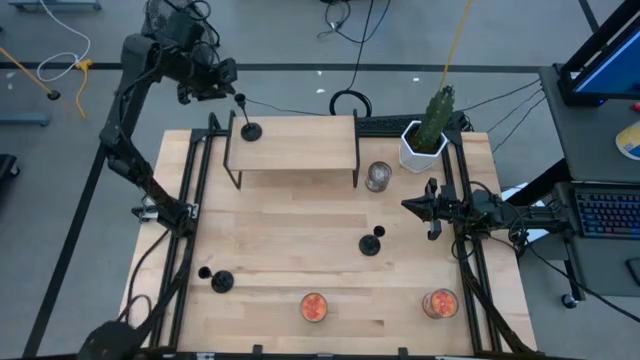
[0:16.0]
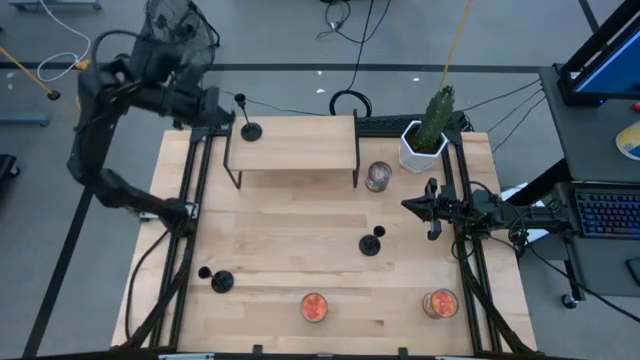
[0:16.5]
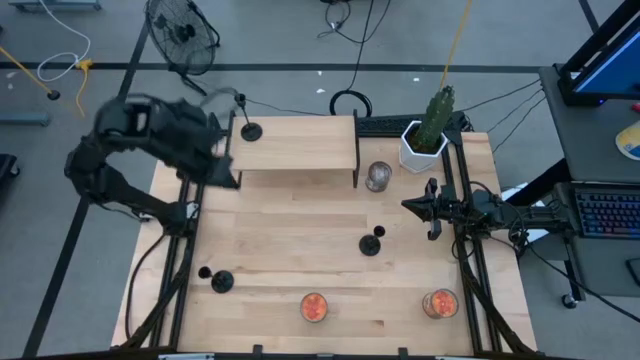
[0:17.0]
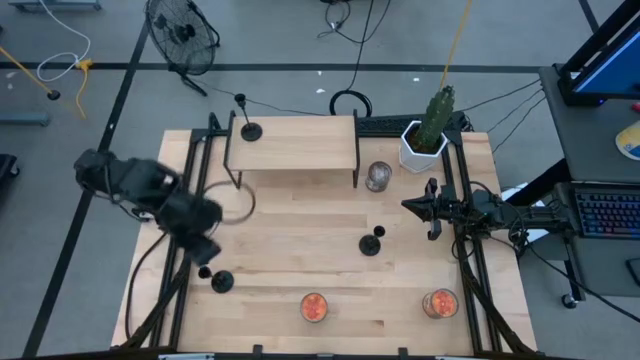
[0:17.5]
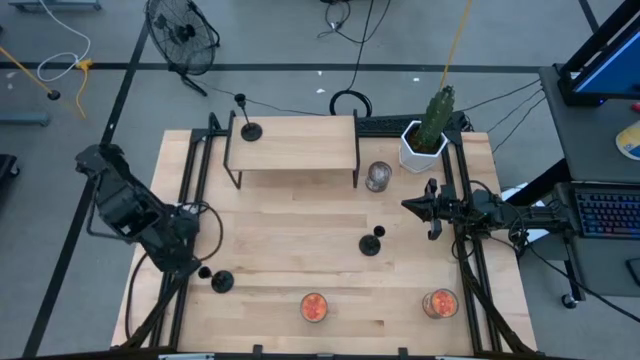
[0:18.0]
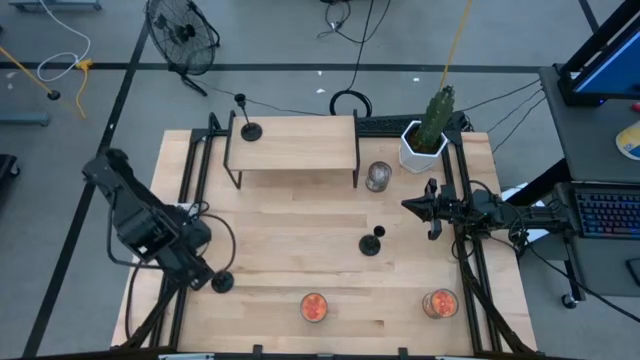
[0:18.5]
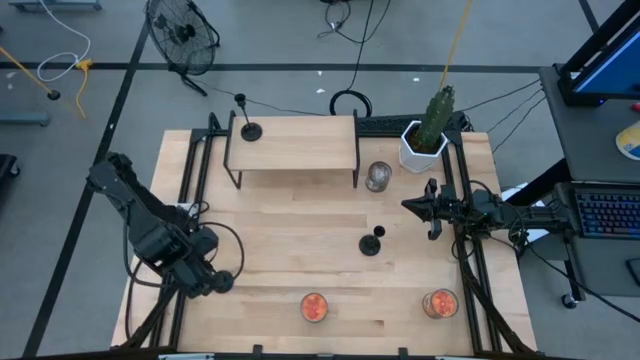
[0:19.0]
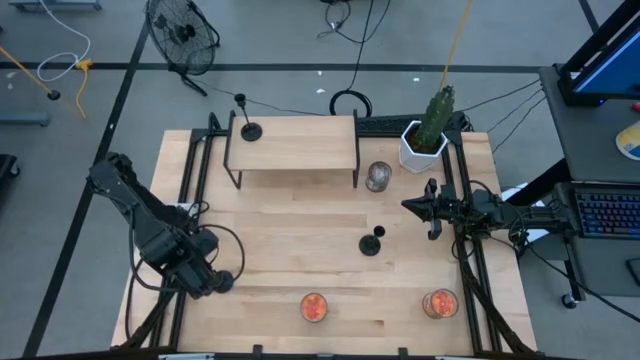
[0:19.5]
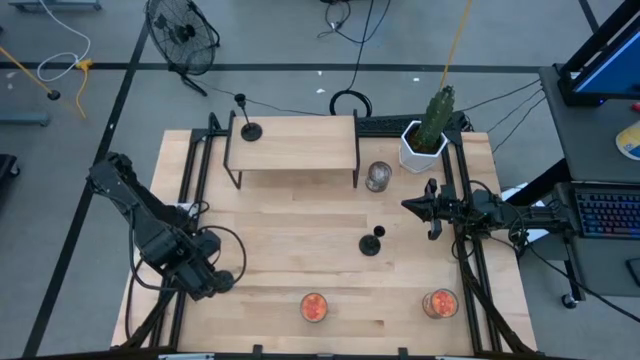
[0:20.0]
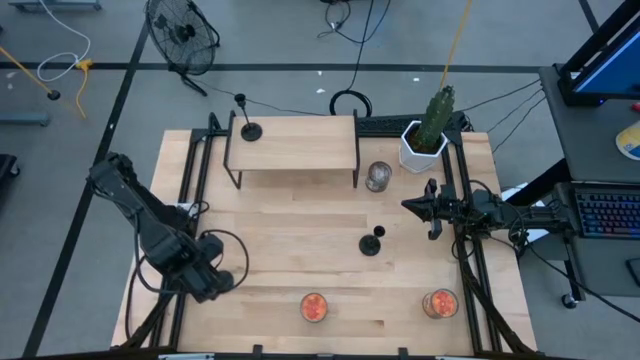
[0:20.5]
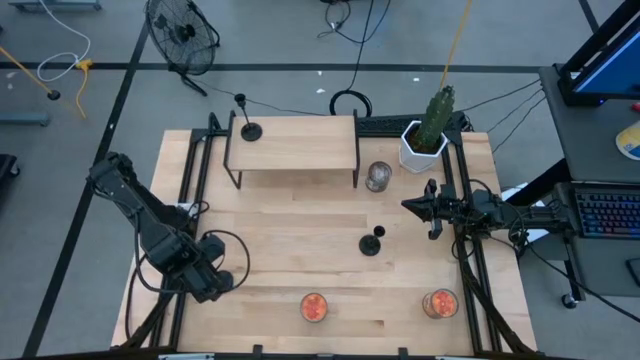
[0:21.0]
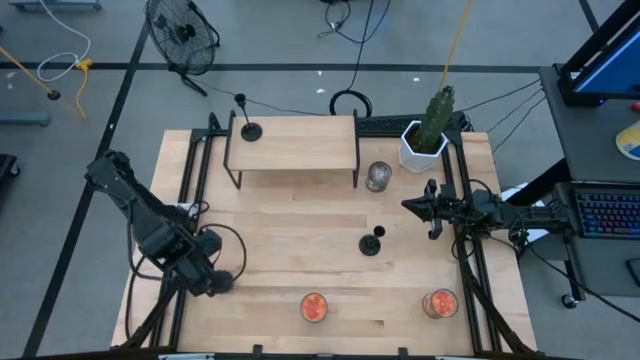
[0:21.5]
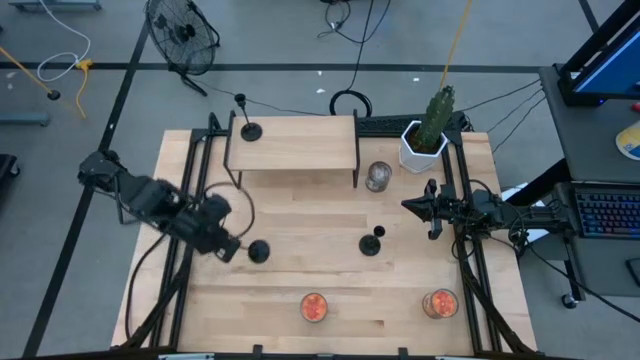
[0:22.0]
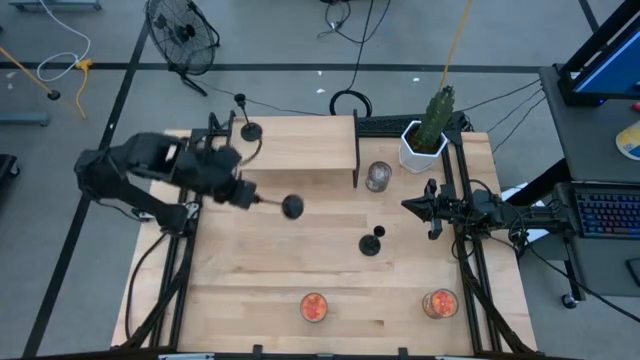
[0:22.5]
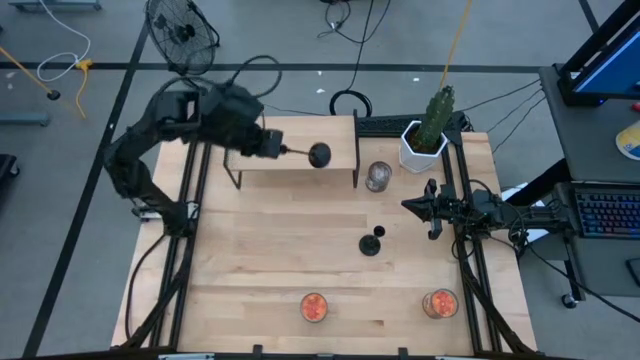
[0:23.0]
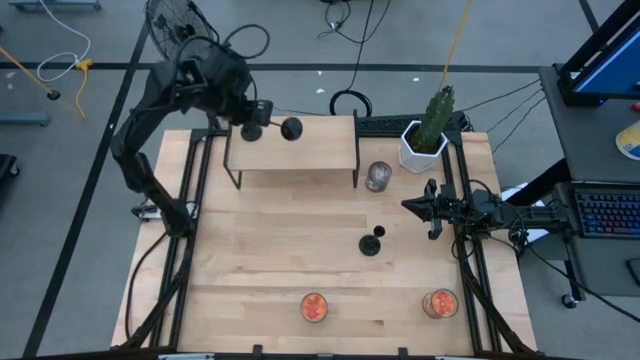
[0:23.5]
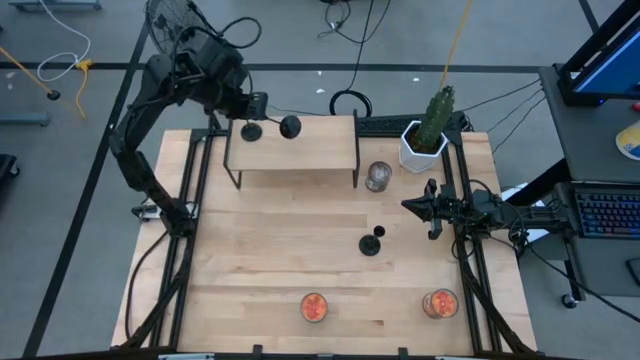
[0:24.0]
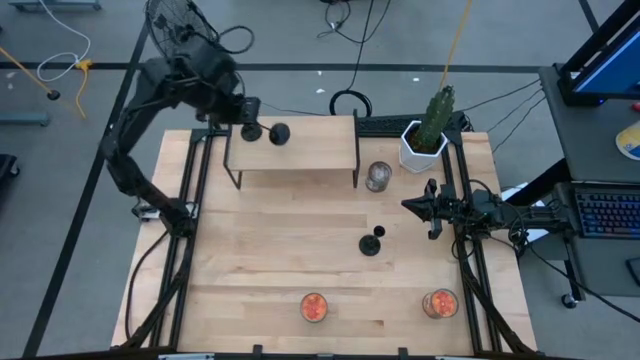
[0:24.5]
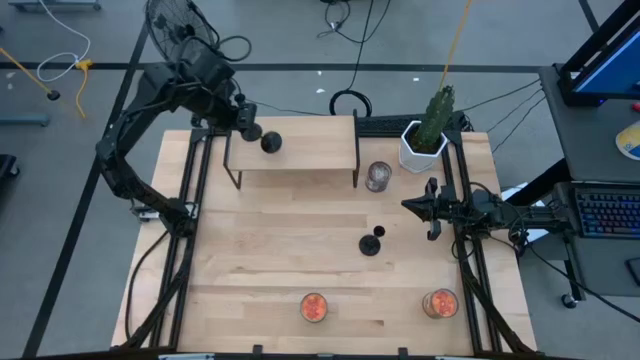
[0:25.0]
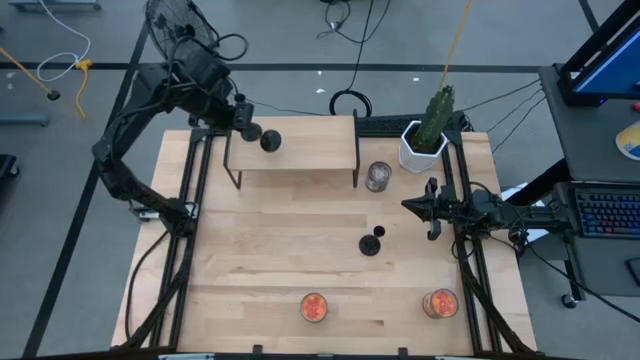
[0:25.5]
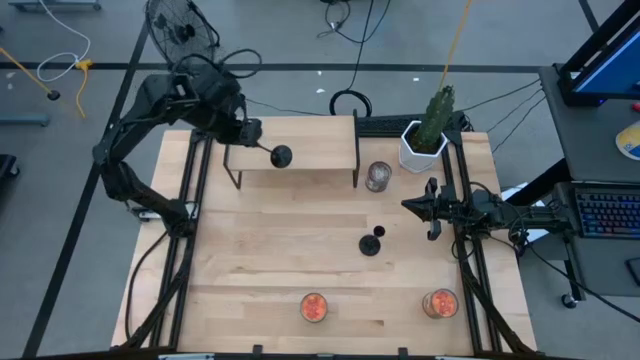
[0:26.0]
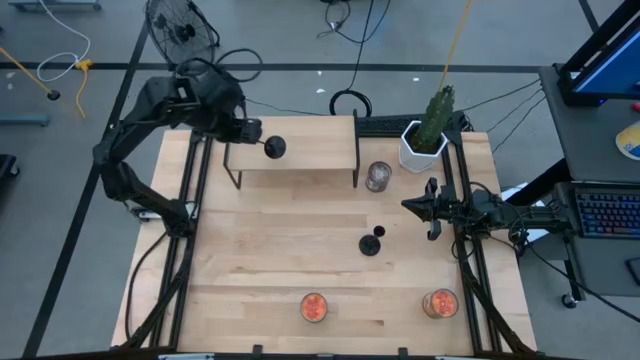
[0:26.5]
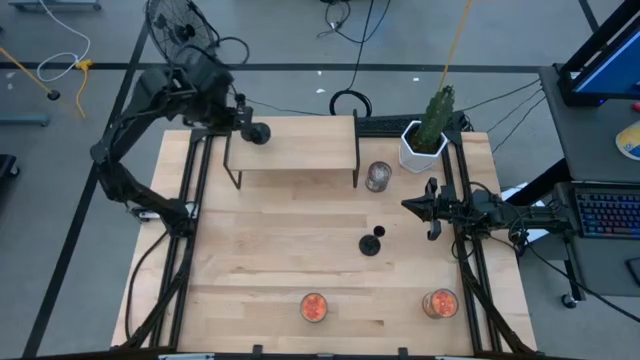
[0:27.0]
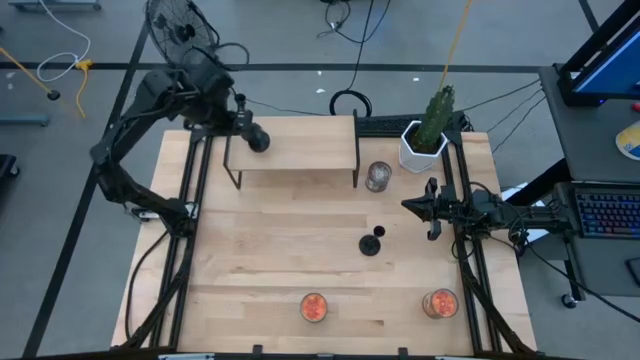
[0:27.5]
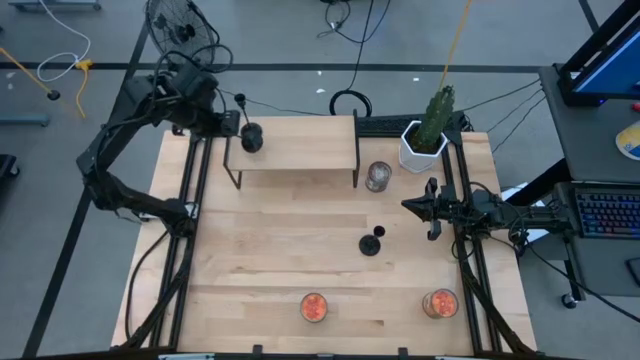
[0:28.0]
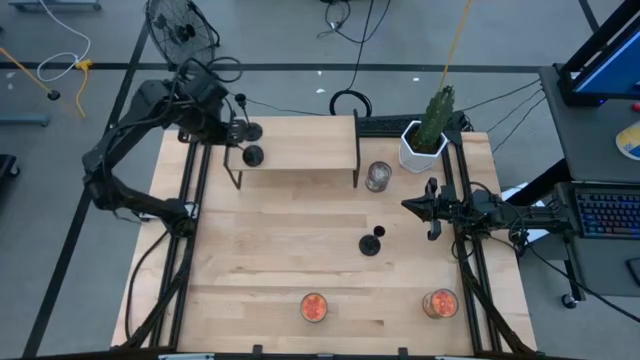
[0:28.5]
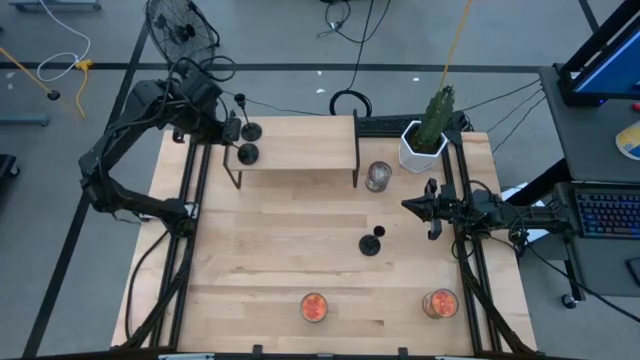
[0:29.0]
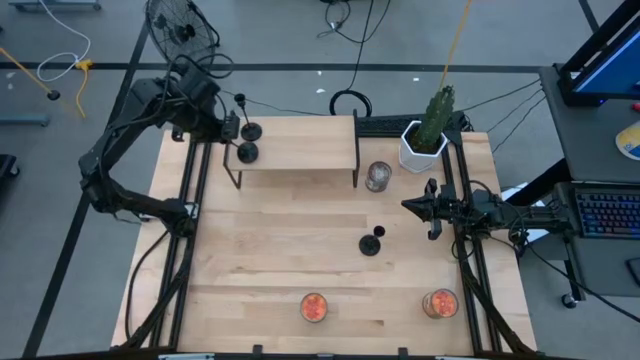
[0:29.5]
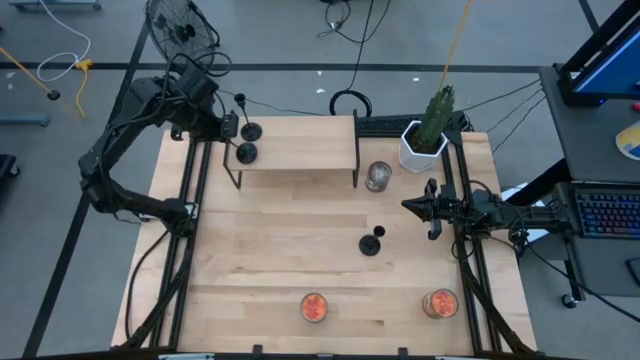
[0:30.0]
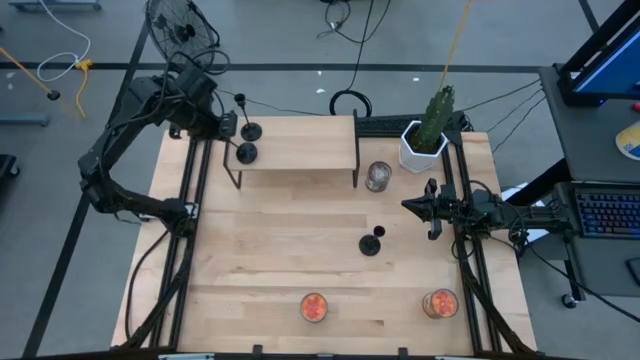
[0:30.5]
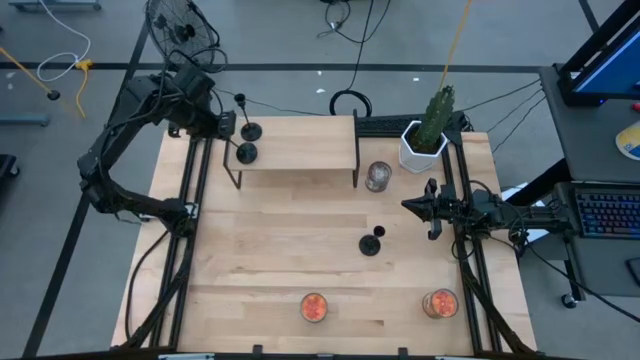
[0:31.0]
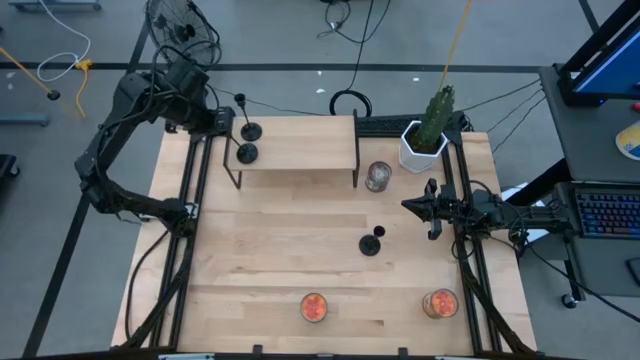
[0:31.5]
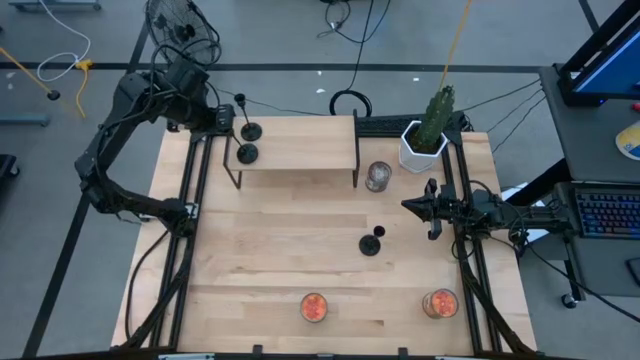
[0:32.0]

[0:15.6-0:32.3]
Task: Pick & Place candle stick holders
Put the left black candle holder on the shelf

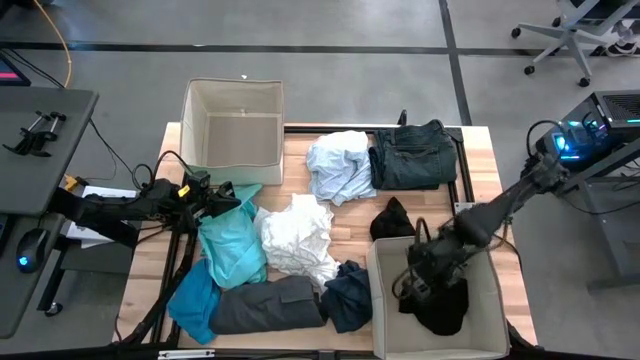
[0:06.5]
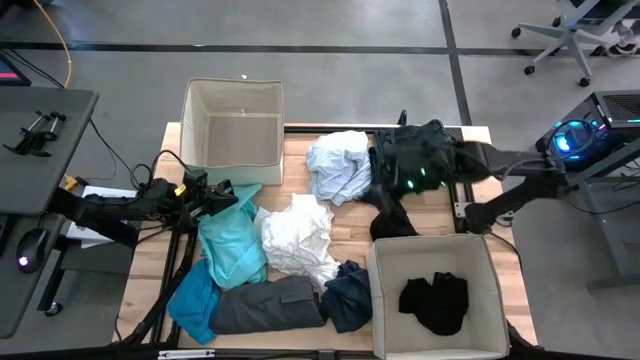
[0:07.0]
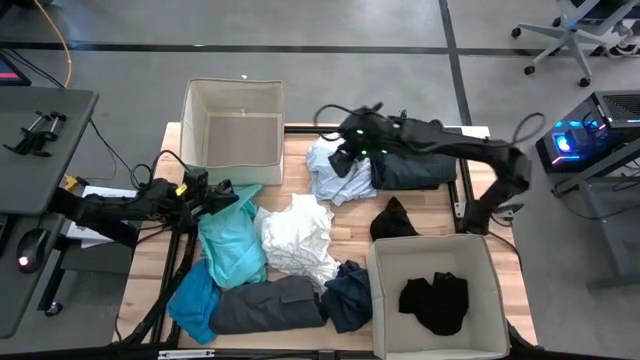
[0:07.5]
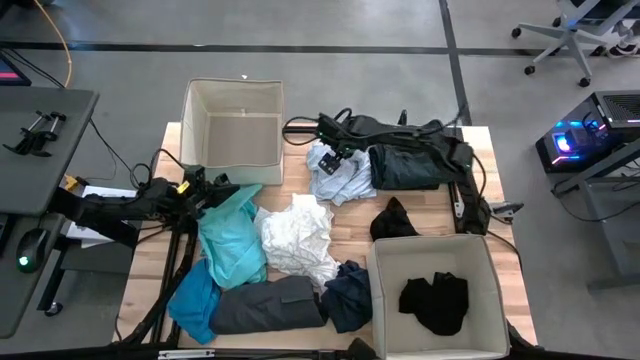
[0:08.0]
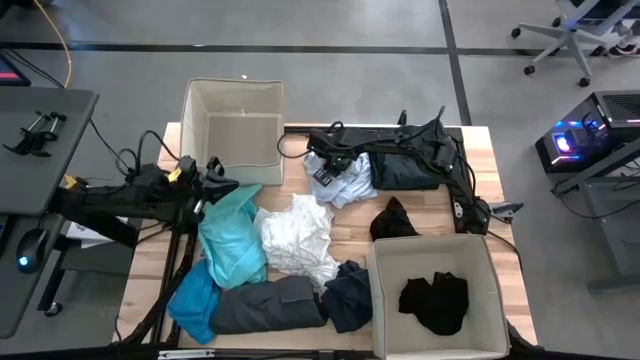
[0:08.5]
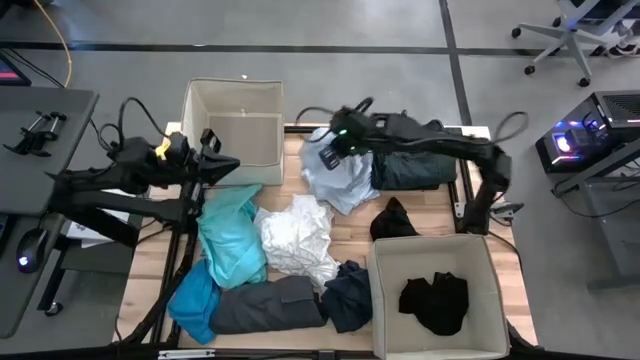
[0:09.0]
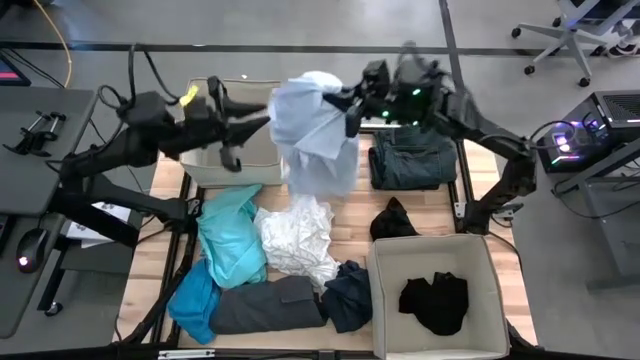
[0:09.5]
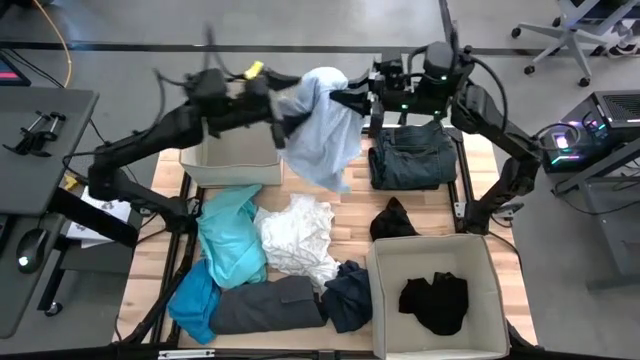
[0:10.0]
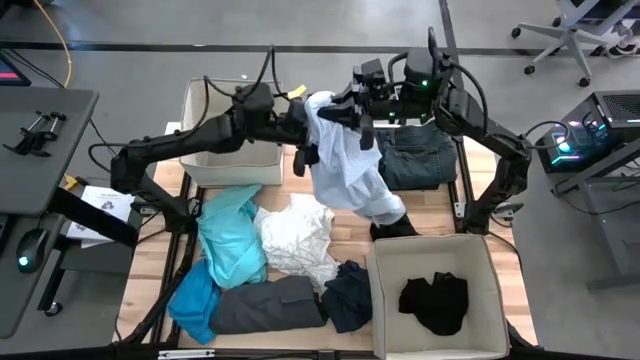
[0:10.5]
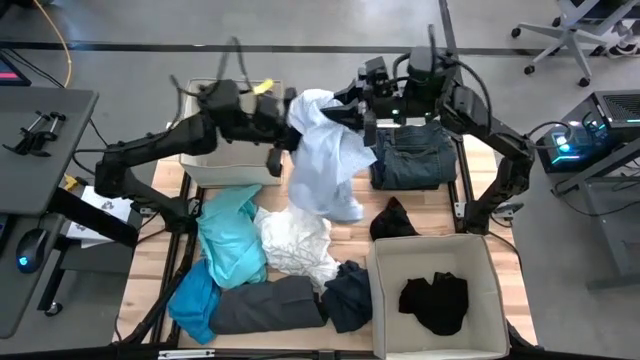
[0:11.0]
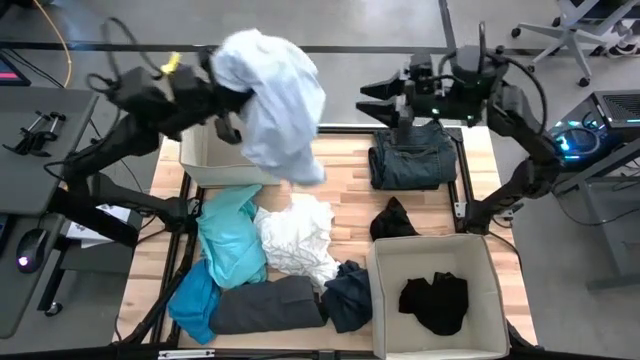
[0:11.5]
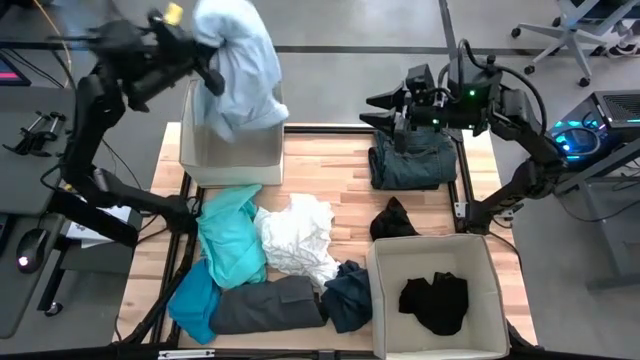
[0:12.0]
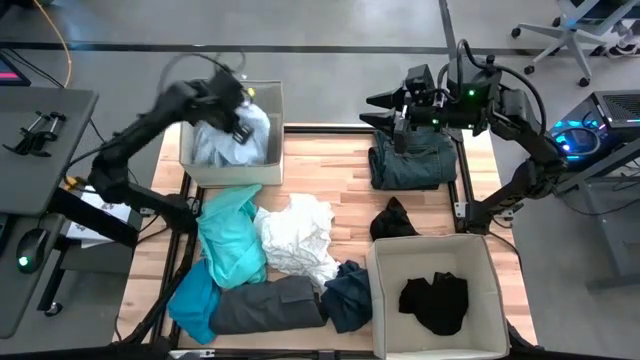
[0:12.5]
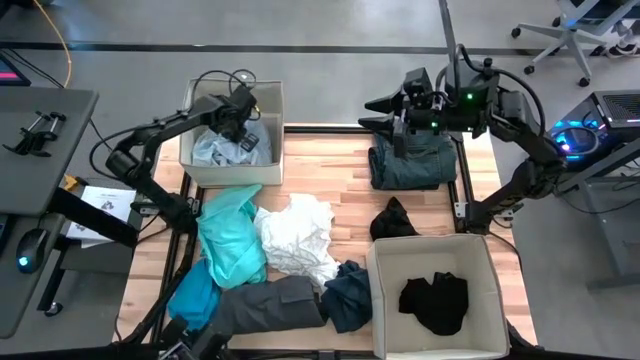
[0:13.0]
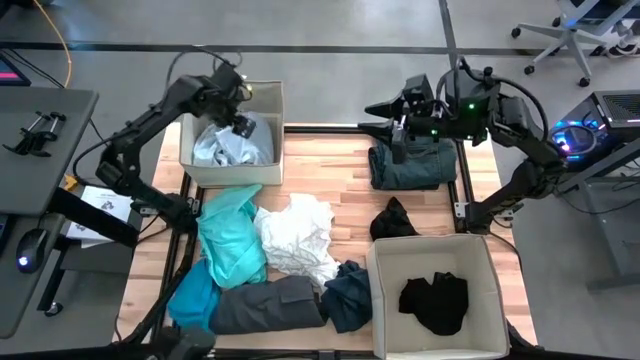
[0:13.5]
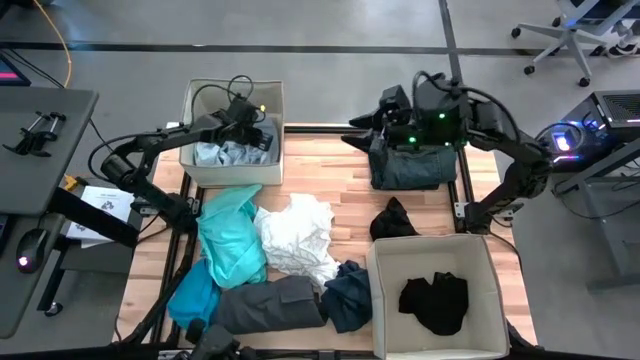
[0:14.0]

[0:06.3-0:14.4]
Task: Sort clothes
Put the light blue shirt into the top laundry organizer
